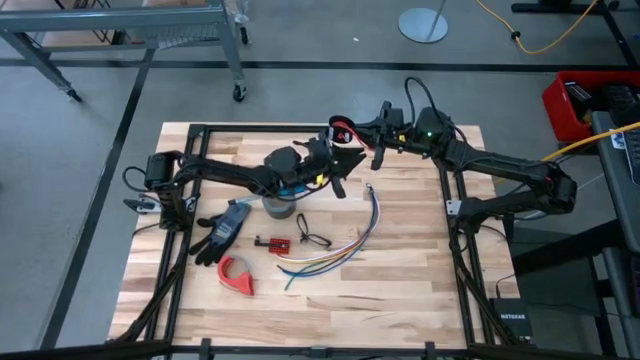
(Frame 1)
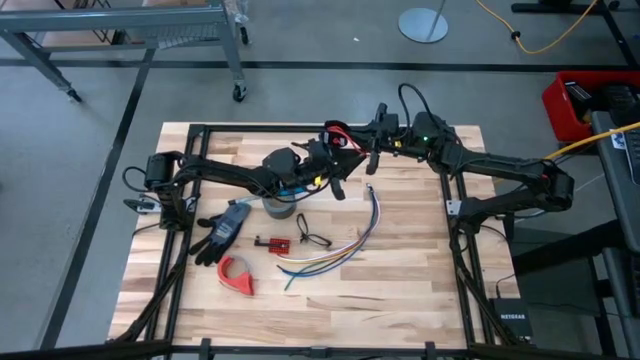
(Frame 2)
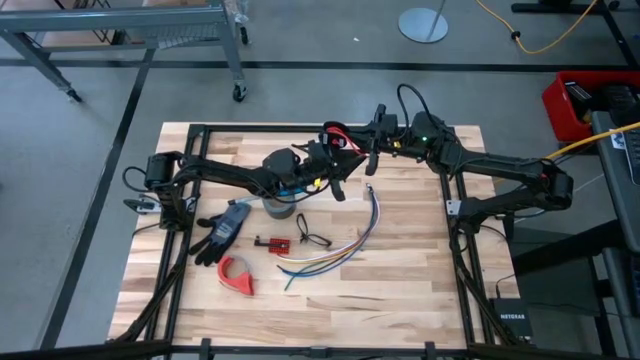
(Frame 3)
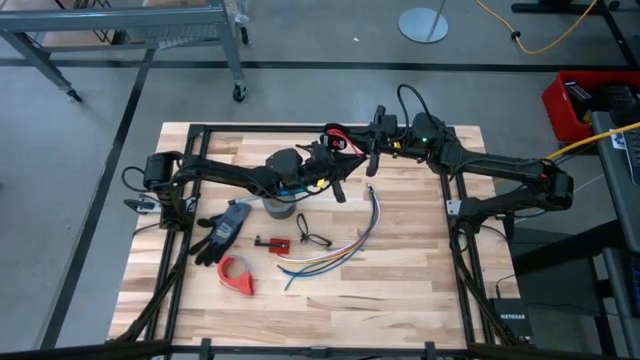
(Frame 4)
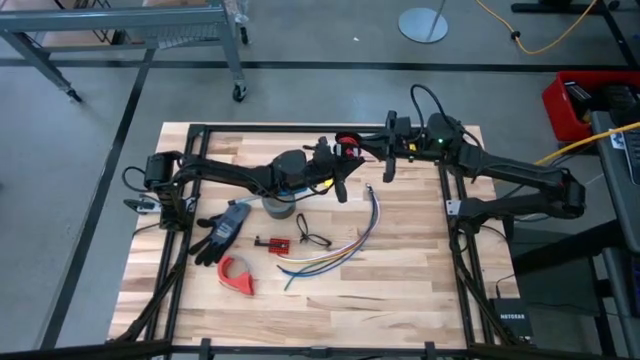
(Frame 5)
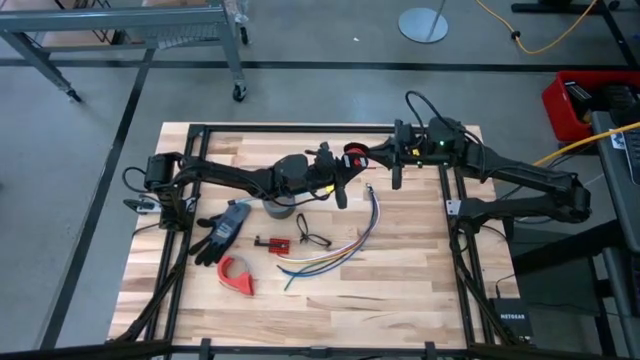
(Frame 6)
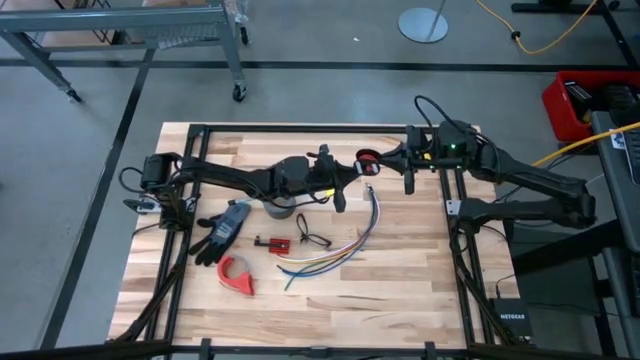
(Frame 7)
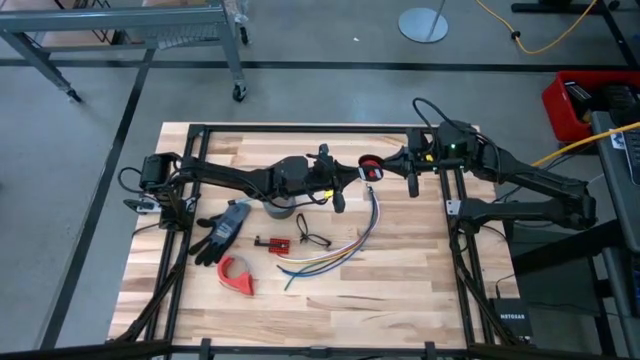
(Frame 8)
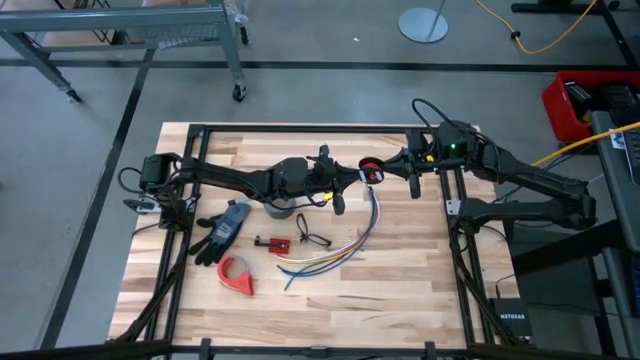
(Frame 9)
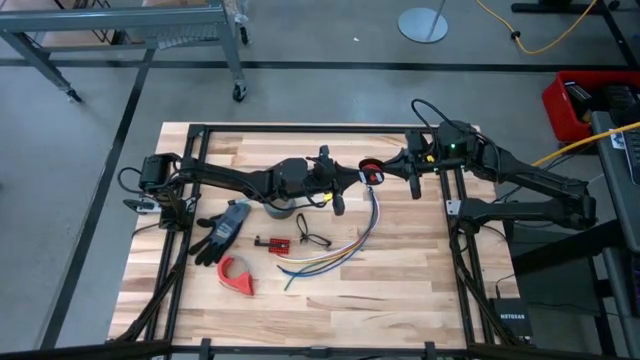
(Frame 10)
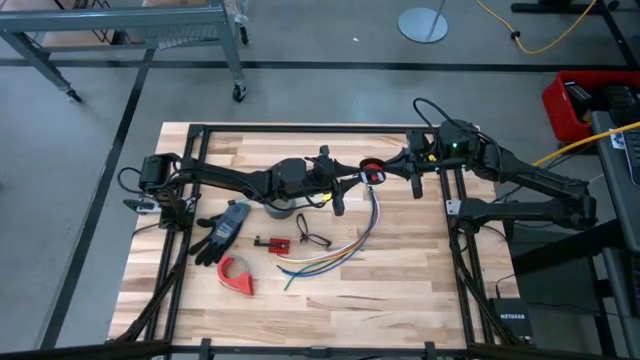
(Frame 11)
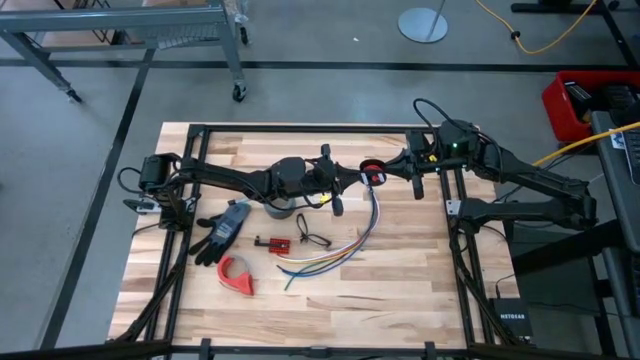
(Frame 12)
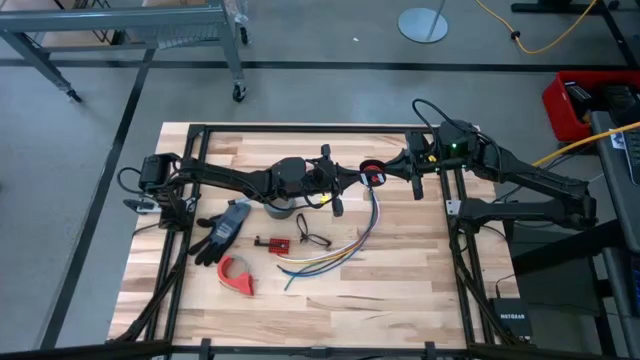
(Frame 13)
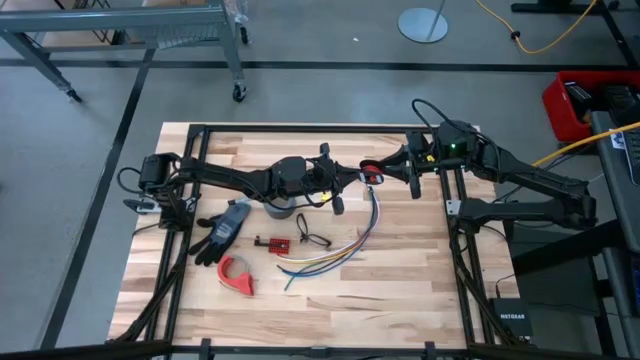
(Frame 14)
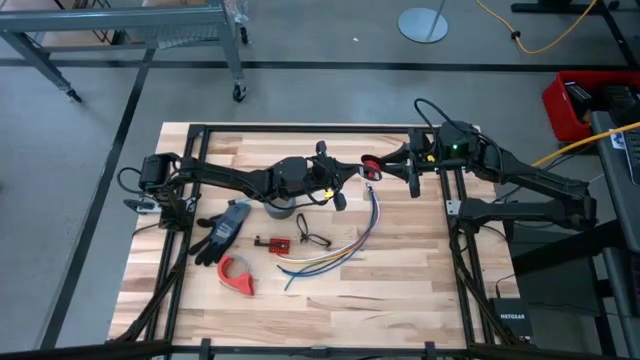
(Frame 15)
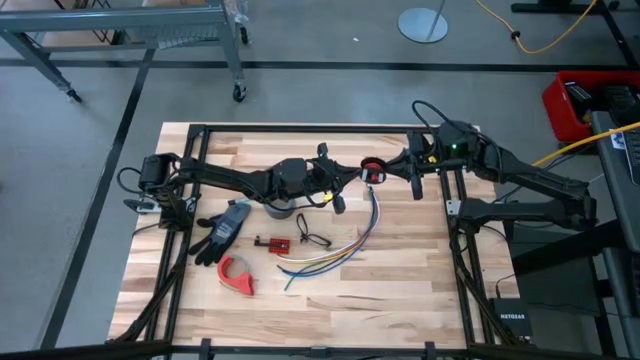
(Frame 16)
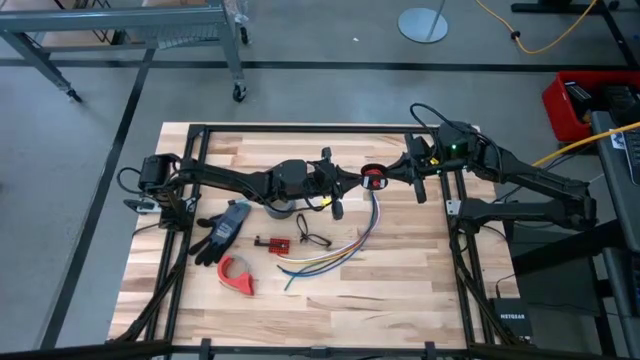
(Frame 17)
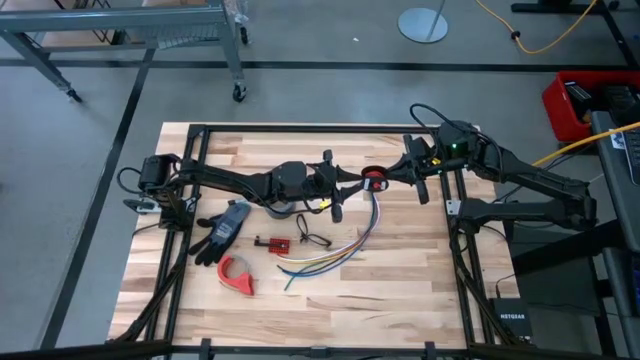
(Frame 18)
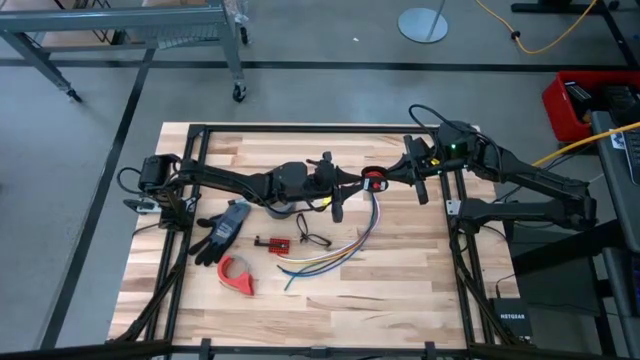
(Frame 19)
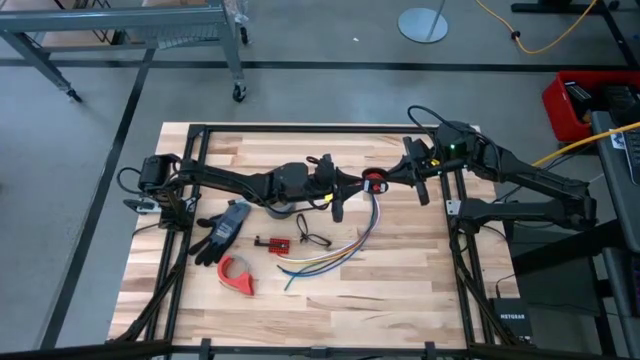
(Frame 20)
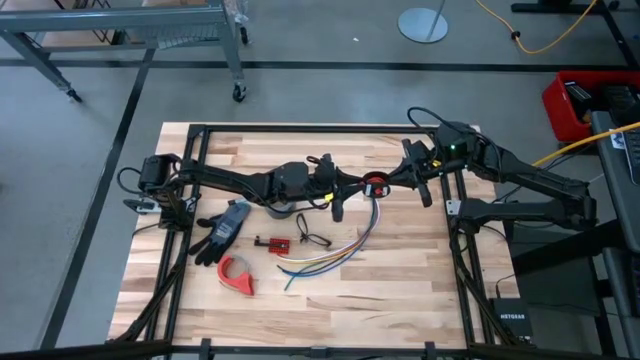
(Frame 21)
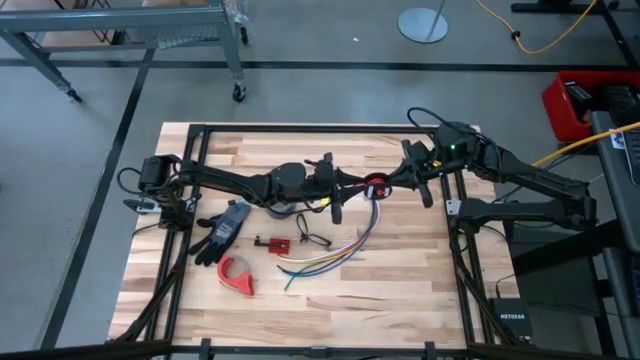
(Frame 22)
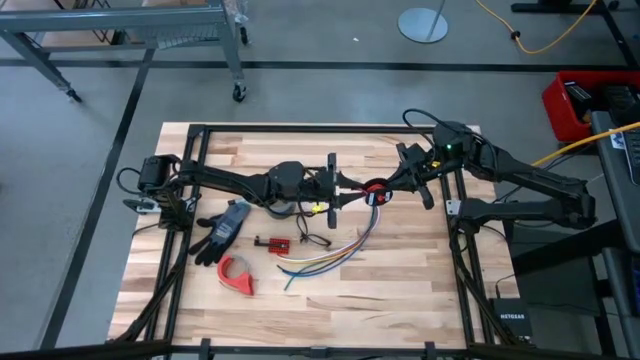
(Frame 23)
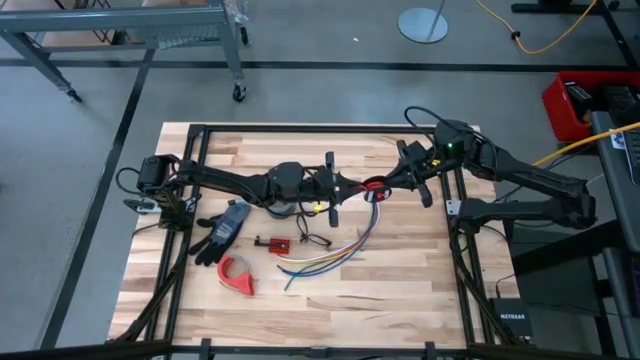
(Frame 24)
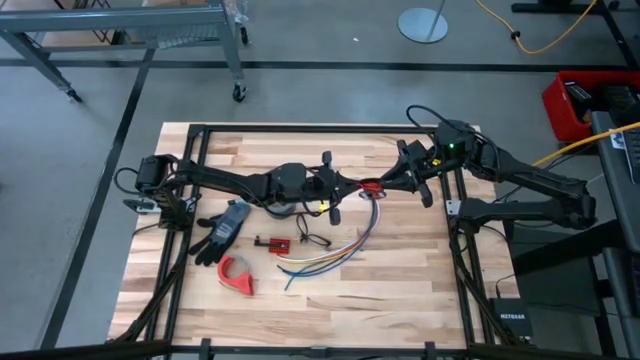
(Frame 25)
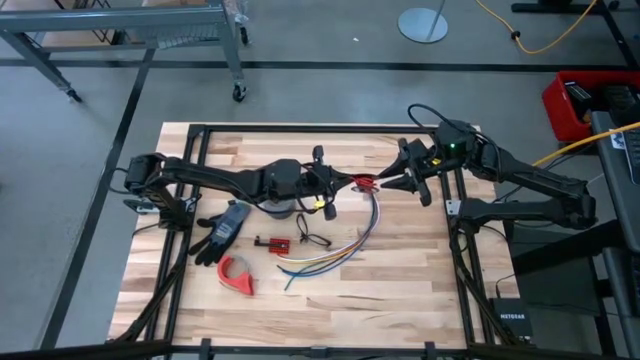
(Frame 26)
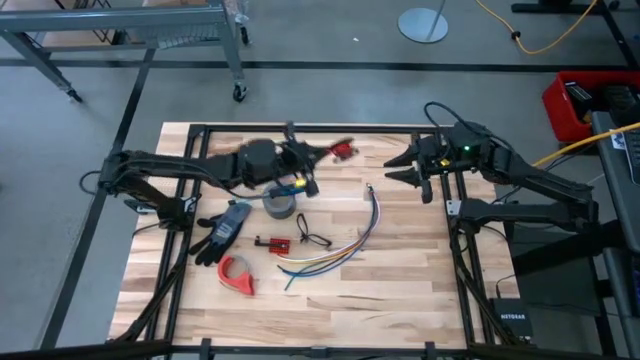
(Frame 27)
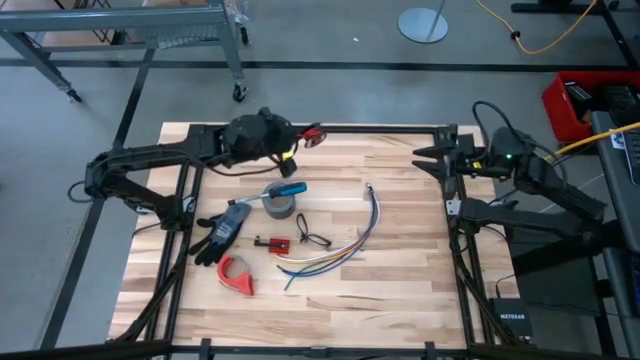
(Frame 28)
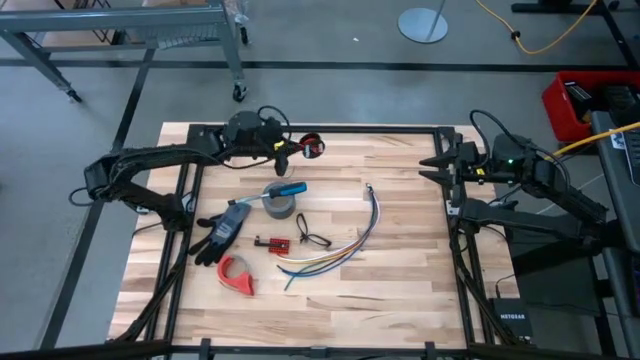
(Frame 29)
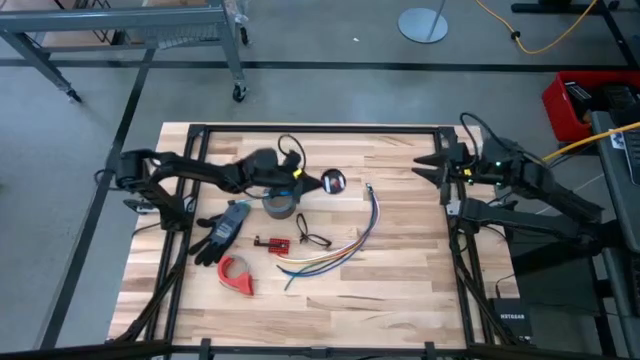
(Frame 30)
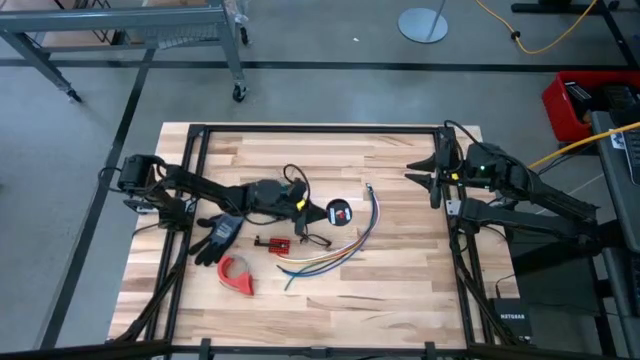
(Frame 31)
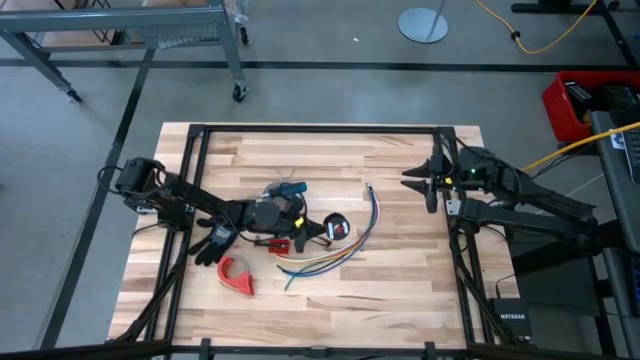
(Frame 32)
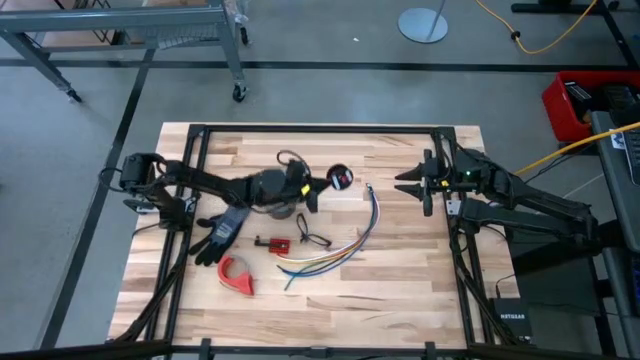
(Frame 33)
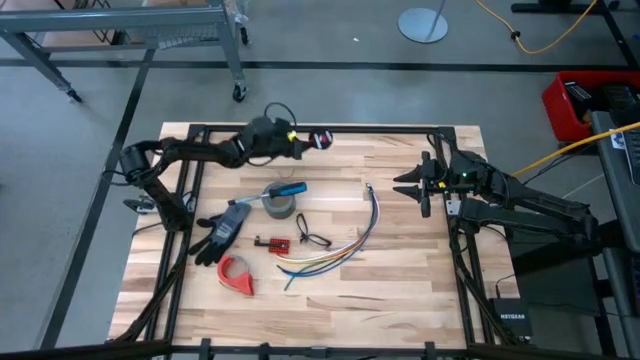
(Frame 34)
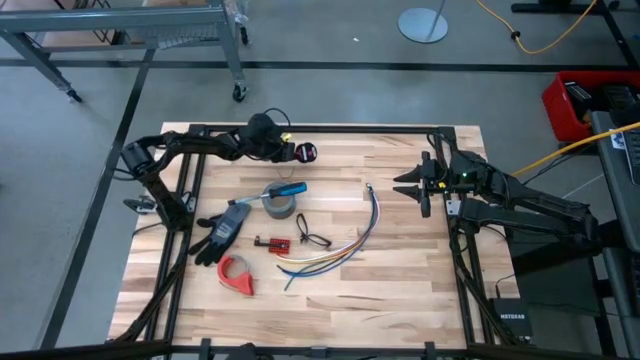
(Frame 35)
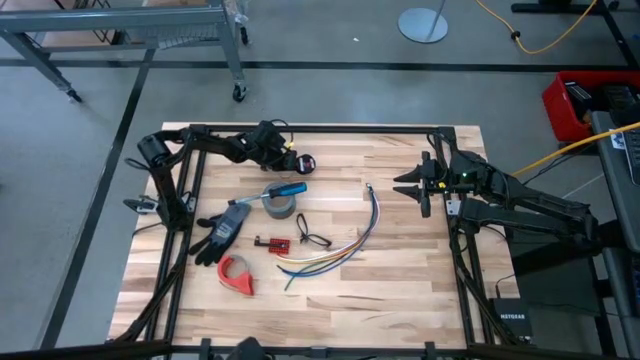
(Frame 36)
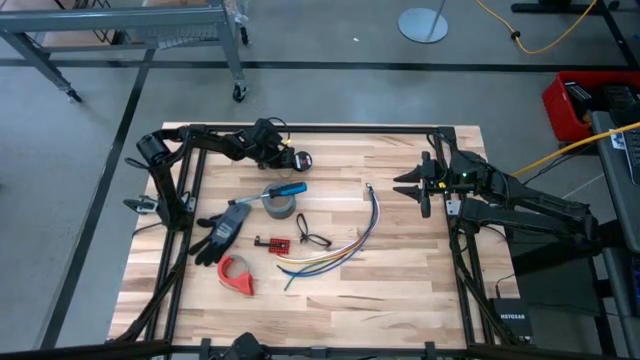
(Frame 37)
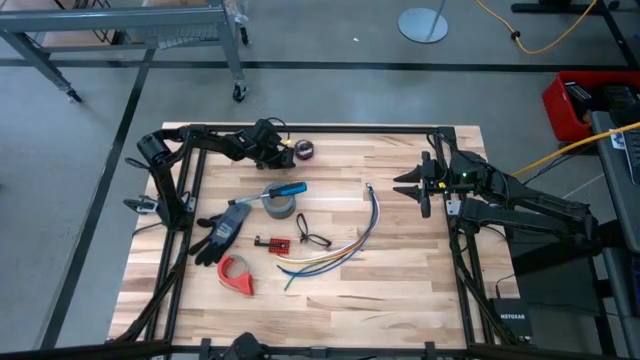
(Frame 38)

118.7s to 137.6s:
Task: Coil cords
Coil the red wire on the spool

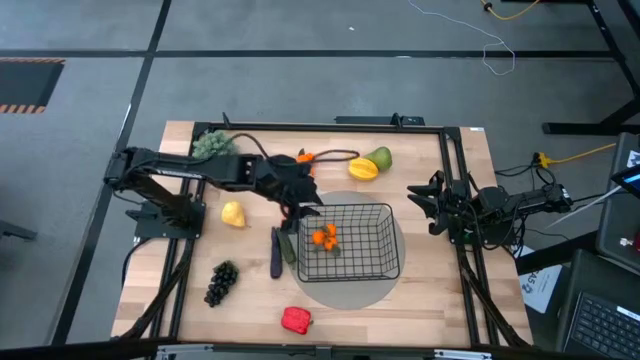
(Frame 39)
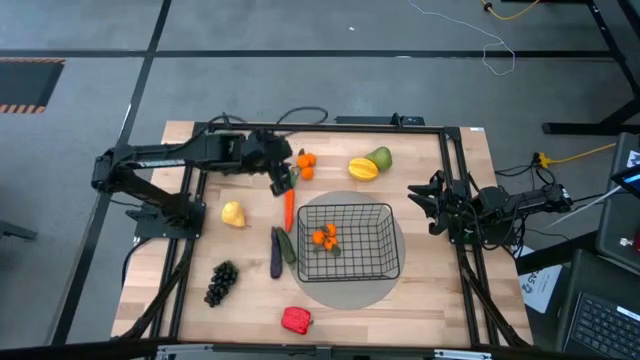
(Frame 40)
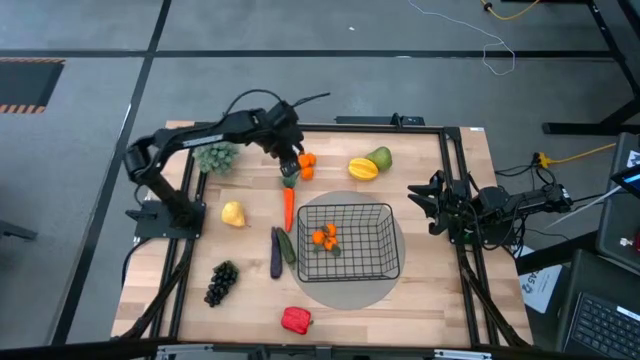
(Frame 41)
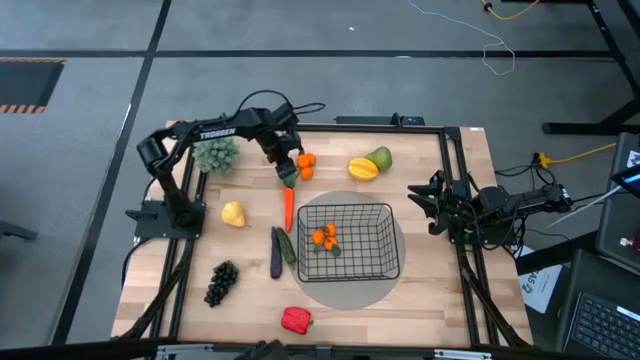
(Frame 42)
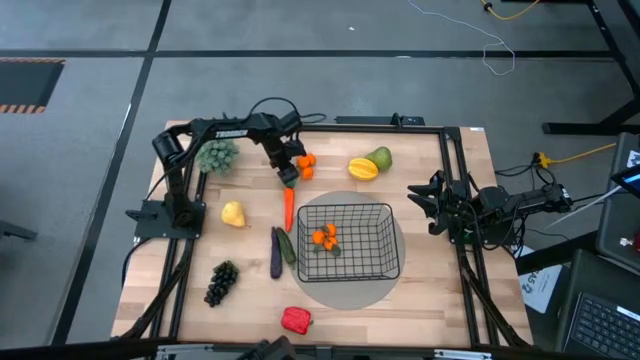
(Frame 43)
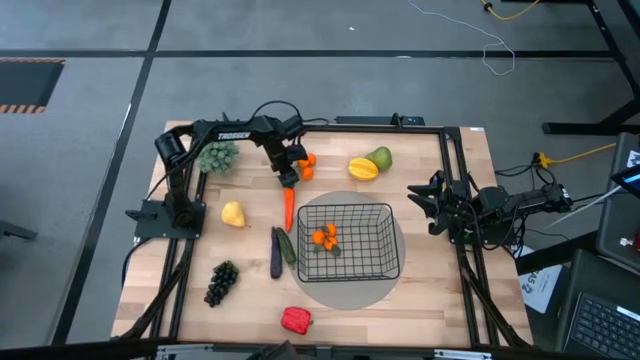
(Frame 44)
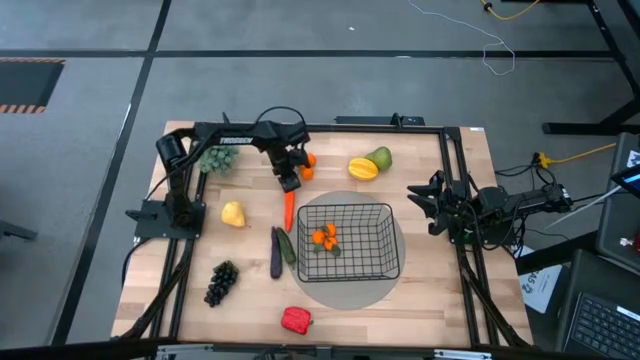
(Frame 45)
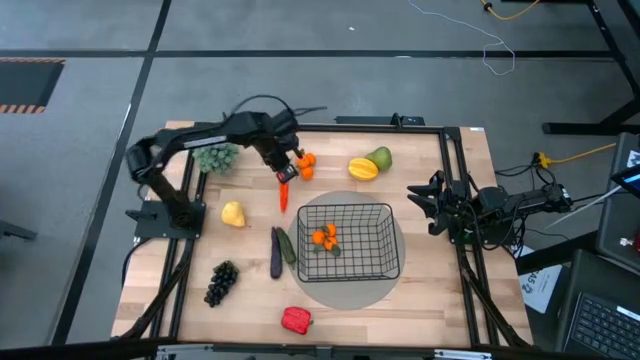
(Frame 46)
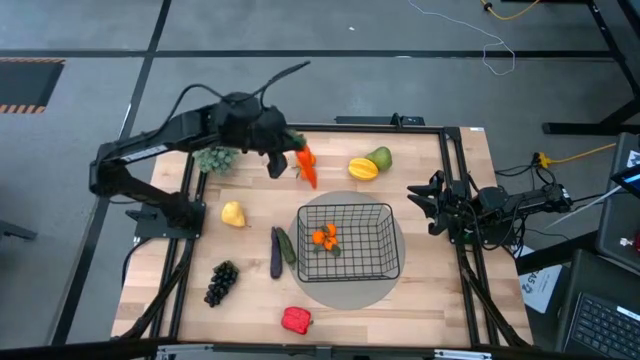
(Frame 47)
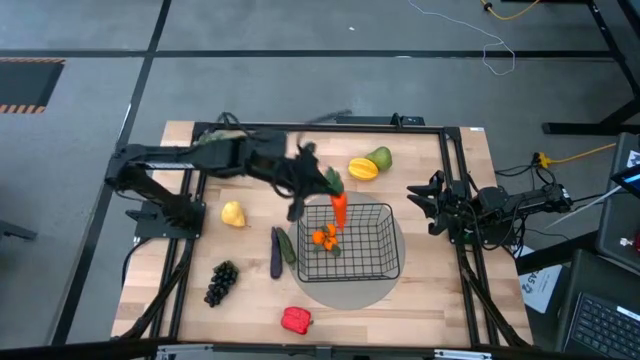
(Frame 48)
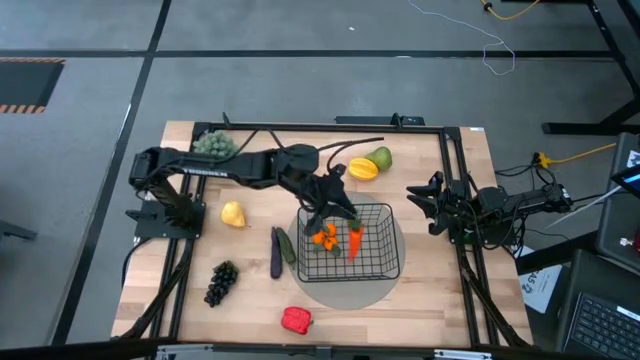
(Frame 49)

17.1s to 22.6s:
Task: Build produce basket
Put the orange carrot into the black wire basket
